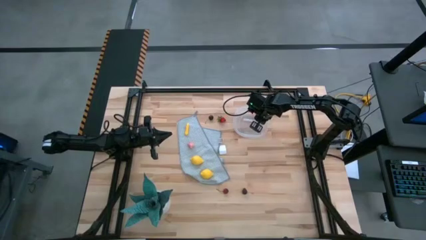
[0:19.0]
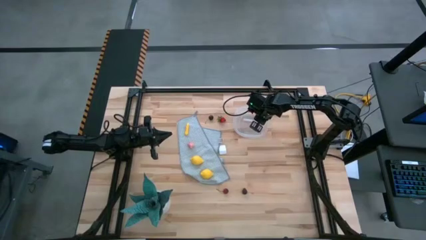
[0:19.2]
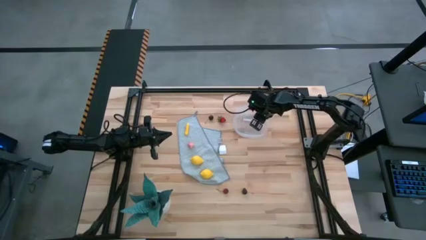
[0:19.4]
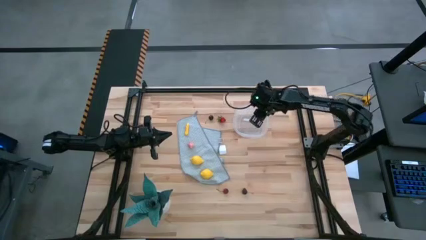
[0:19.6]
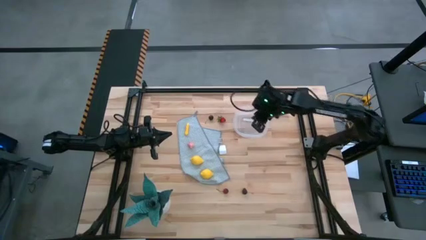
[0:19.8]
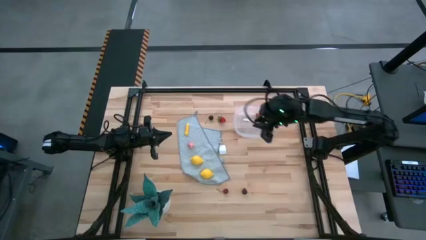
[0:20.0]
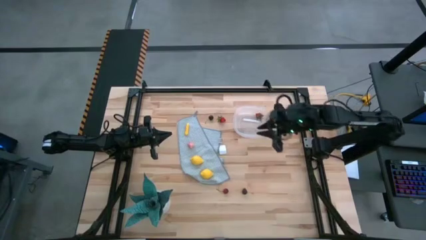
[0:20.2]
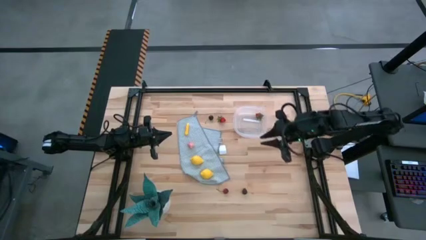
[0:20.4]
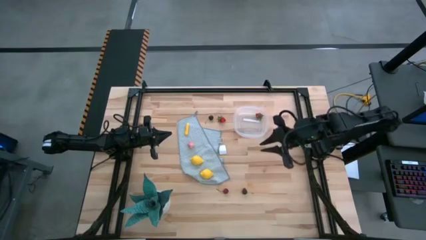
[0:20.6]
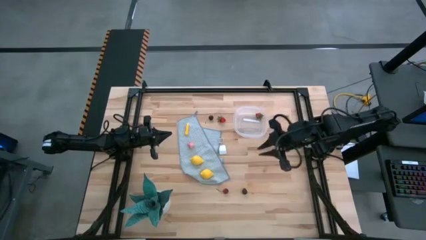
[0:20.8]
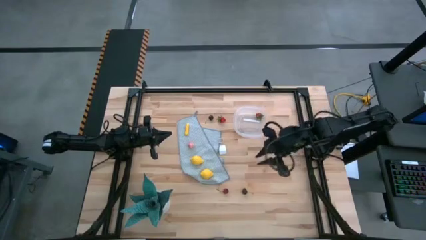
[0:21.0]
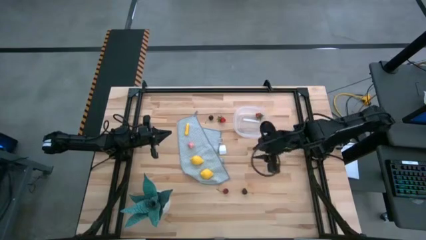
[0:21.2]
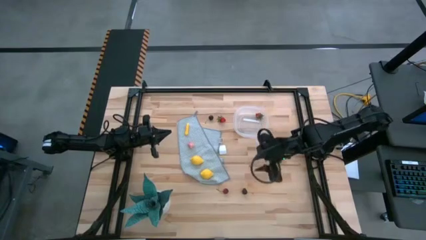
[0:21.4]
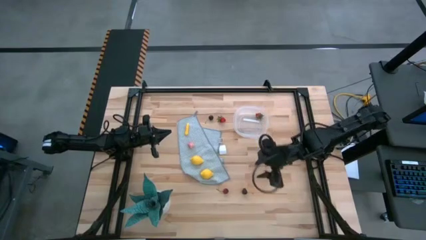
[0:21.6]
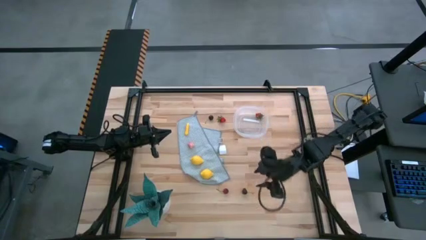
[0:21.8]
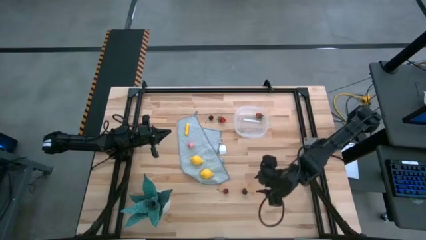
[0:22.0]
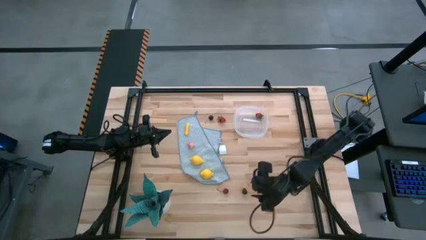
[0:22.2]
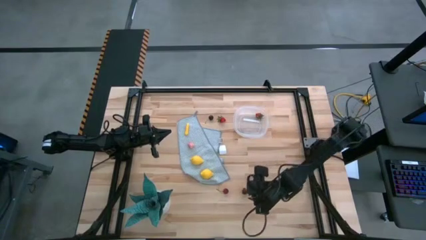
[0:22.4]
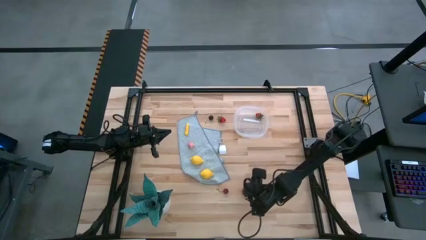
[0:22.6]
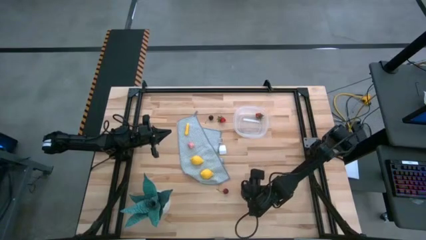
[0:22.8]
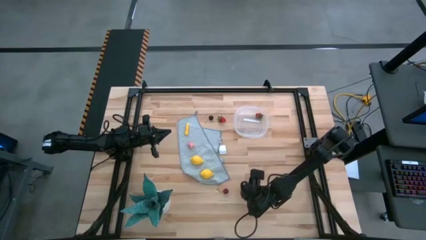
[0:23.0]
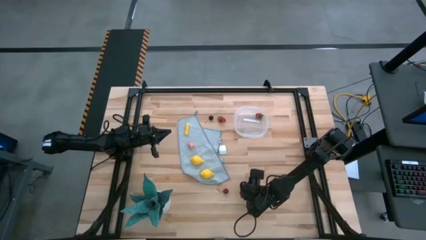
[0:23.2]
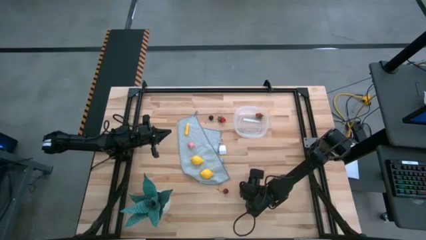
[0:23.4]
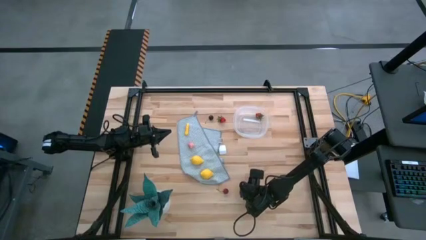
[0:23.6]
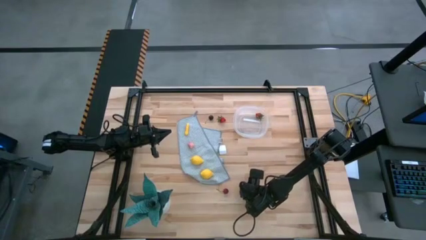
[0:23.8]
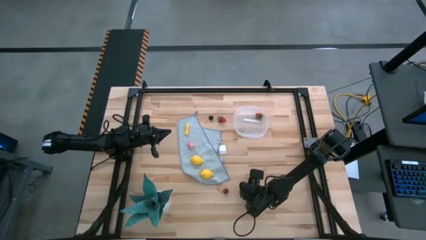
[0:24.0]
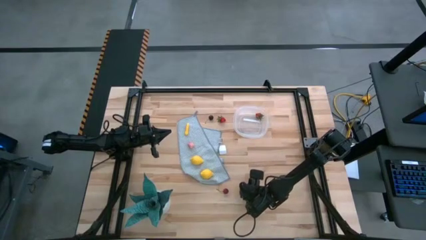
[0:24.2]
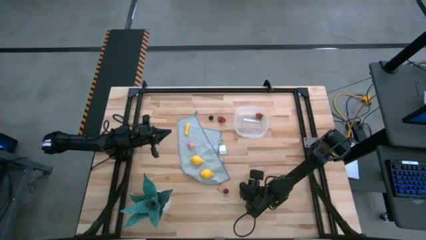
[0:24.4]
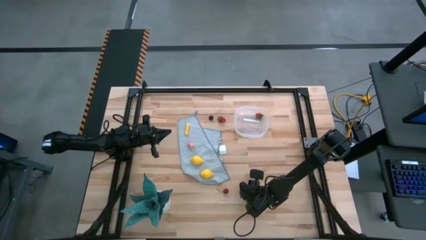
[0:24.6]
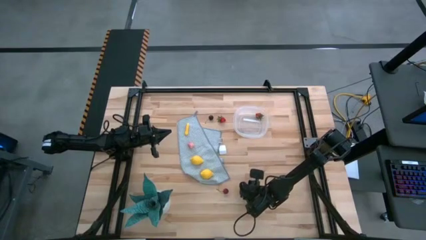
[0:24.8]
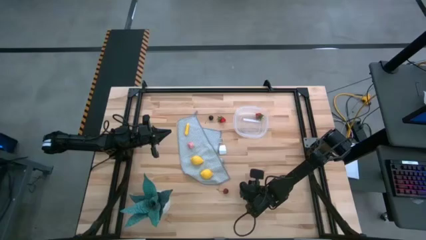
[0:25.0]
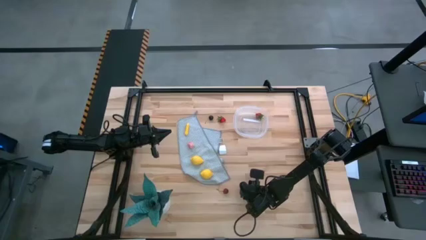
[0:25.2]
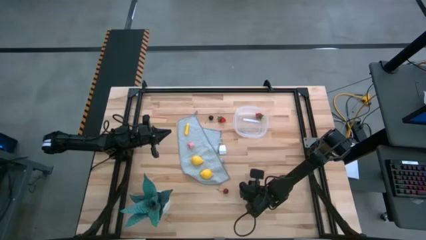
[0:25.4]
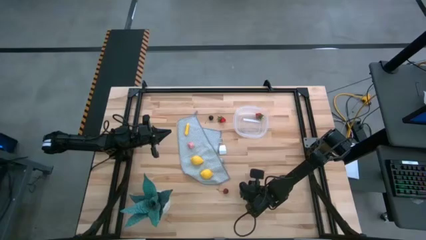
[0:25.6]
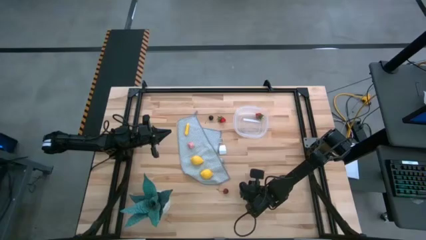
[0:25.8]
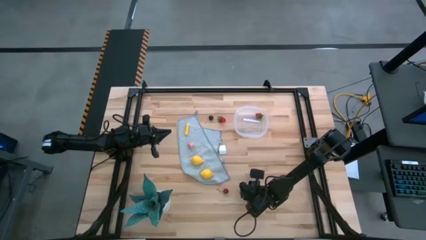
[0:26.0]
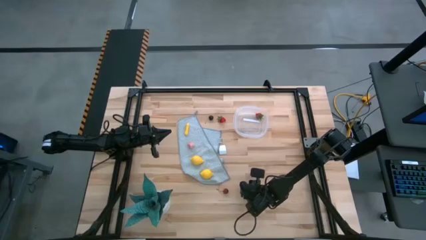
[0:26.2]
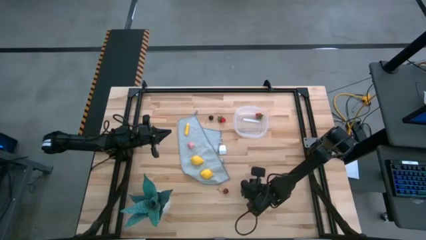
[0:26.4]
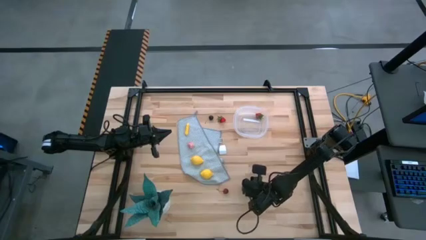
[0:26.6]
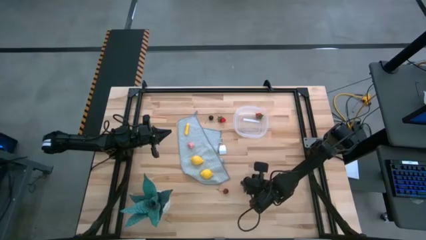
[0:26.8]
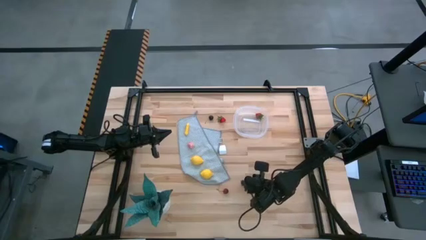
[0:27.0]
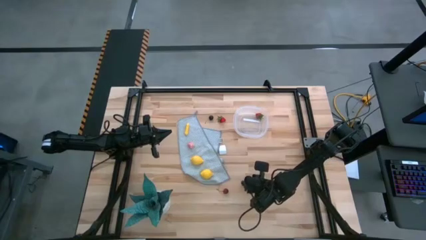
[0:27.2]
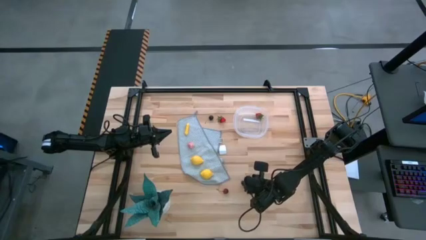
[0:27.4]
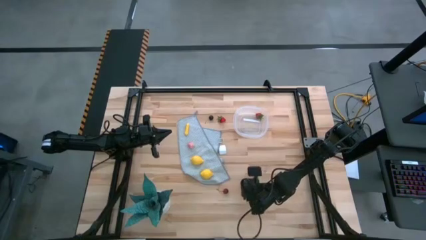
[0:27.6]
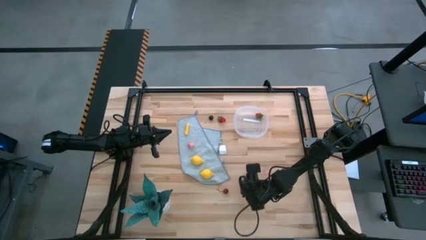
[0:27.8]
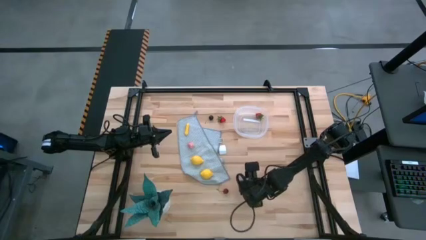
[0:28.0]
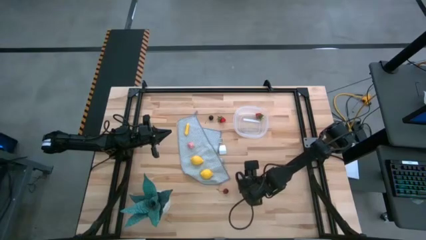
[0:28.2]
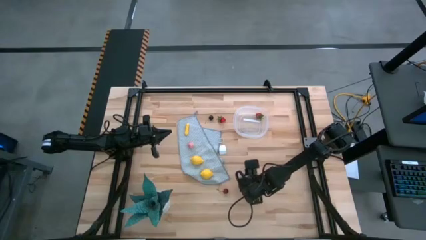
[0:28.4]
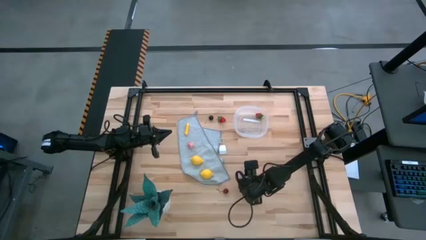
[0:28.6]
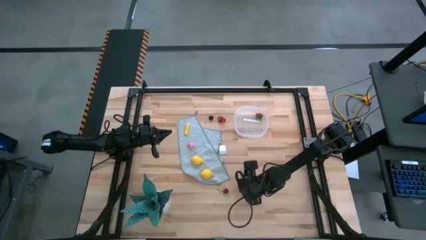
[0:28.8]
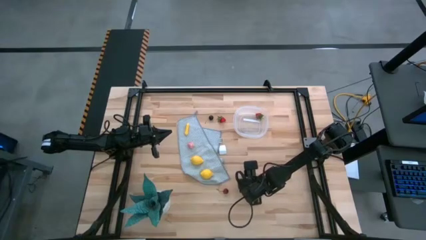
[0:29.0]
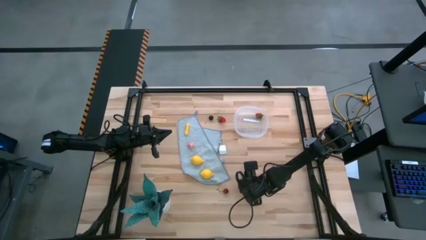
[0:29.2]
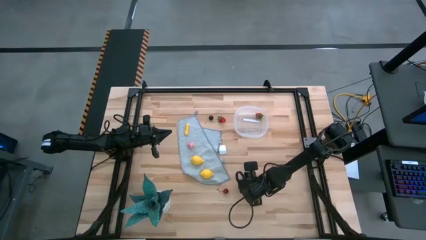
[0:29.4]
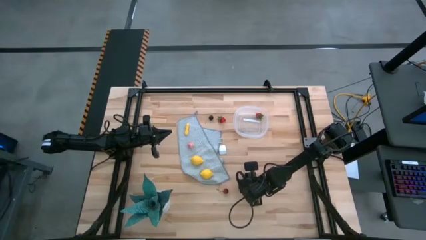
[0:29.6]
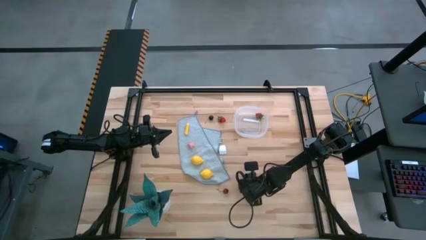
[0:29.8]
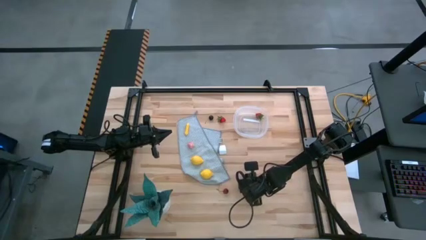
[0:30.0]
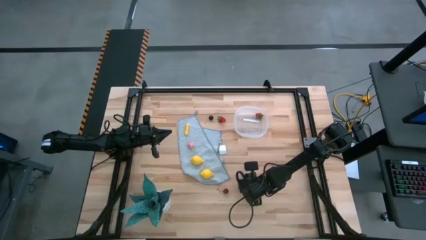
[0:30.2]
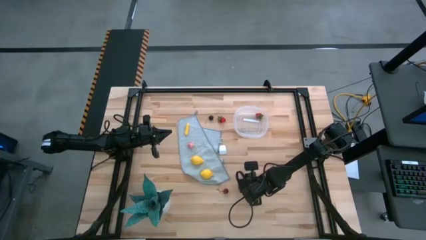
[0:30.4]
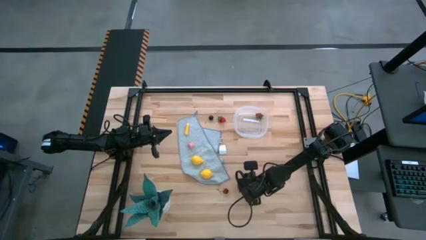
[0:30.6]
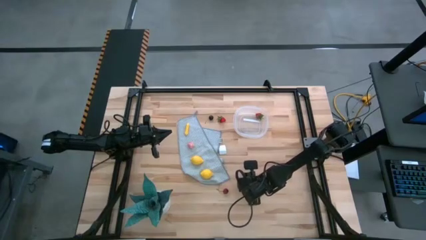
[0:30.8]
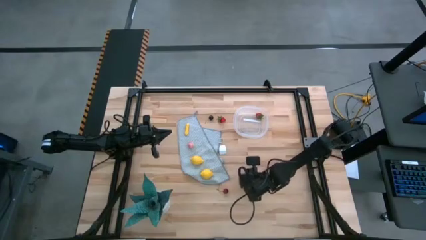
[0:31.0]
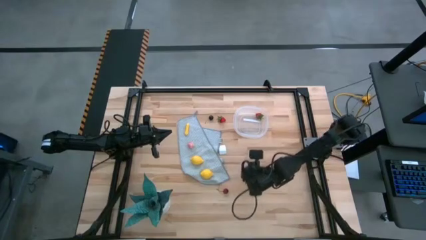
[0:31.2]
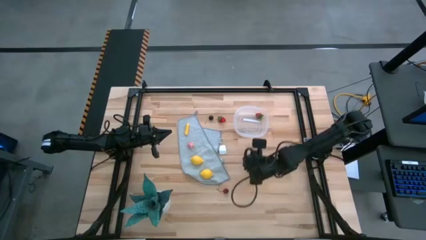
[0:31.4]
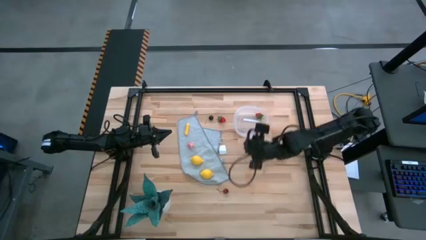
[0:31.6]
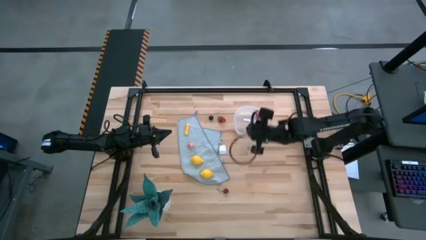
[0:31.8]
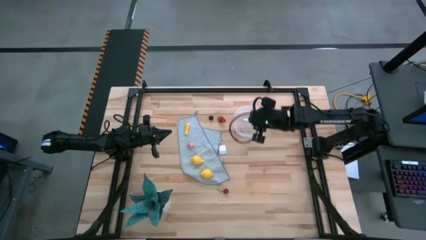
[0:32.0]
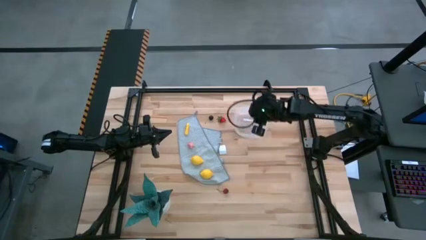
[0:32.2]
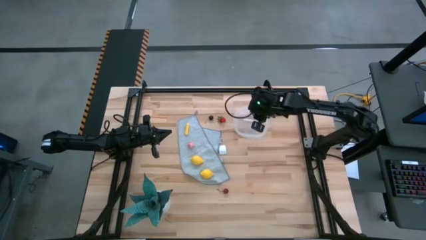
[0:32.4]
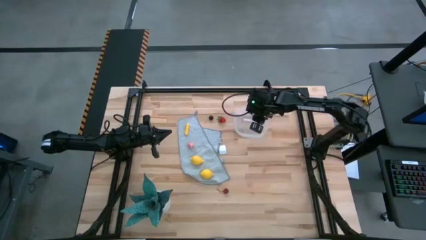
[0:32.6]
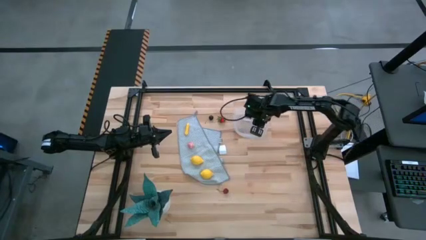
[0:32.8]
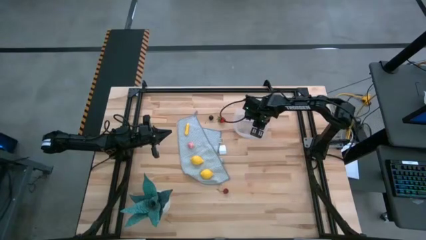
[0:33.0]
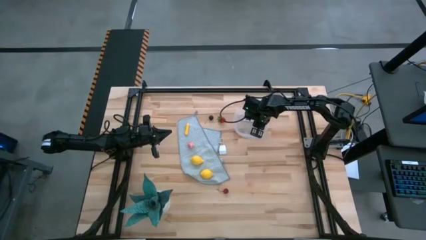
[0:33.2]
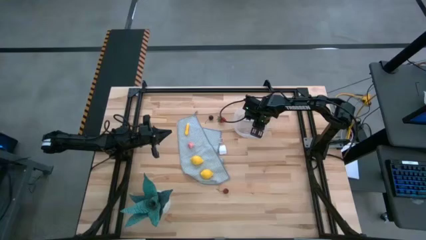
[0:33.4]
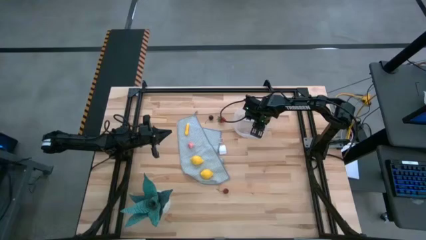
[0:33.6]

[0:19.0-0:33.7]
Task: Pick and placing Produce into tupperware
Put the blackberry into the transparent bin
